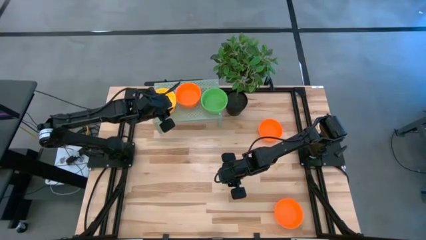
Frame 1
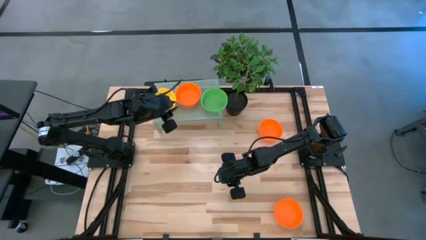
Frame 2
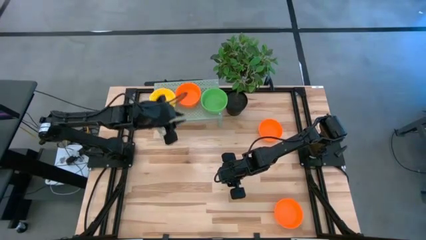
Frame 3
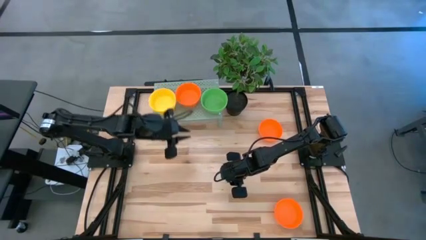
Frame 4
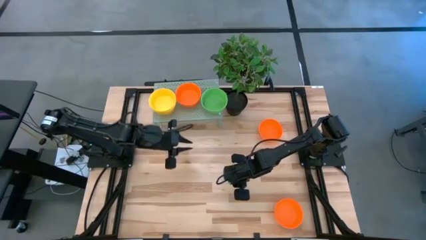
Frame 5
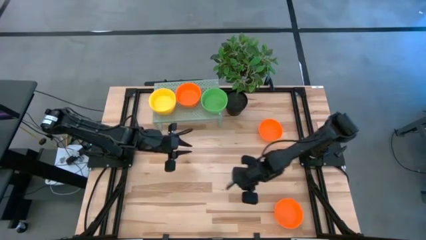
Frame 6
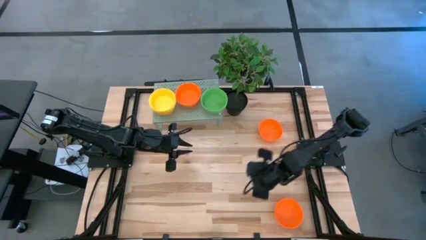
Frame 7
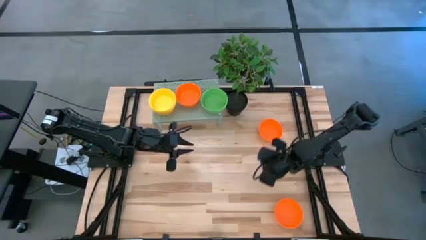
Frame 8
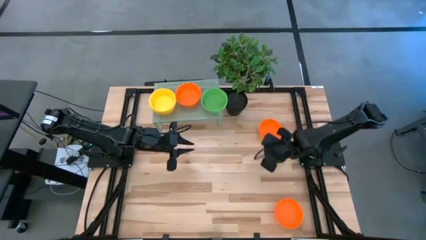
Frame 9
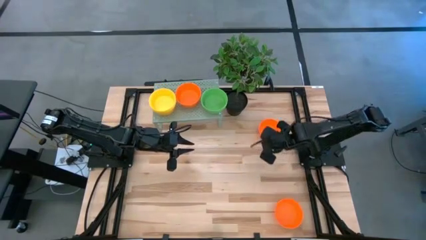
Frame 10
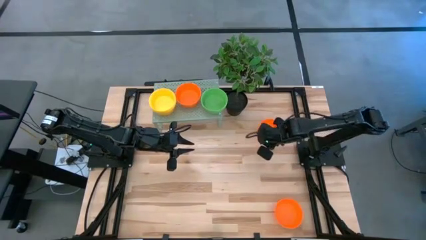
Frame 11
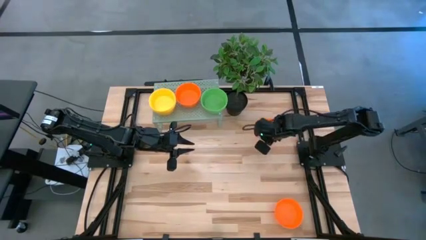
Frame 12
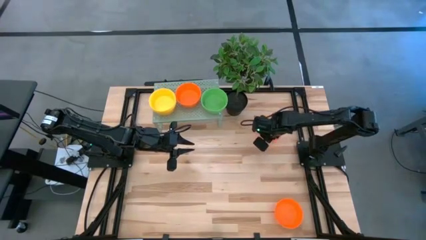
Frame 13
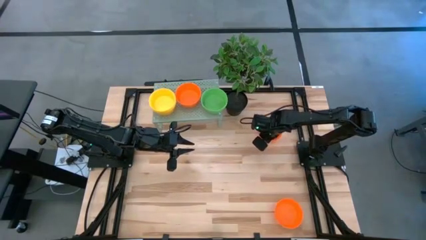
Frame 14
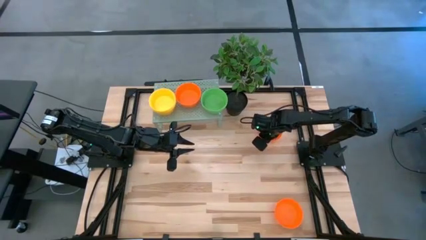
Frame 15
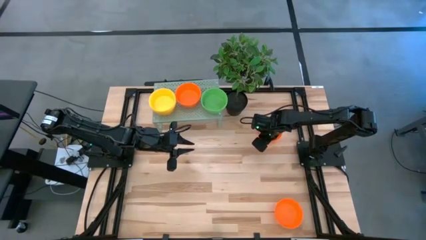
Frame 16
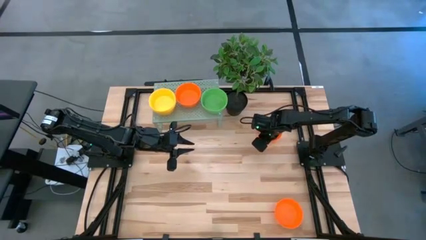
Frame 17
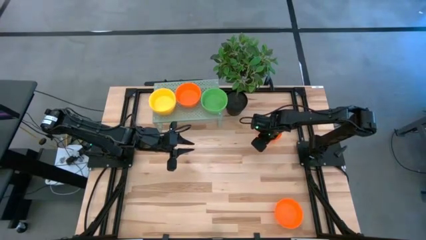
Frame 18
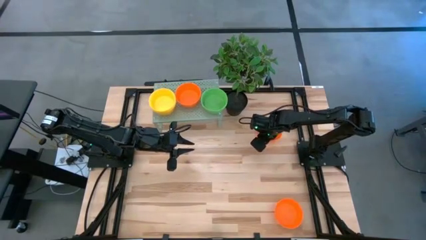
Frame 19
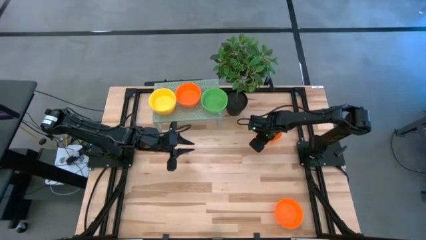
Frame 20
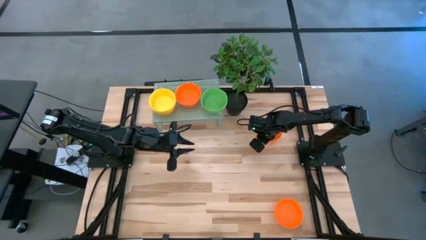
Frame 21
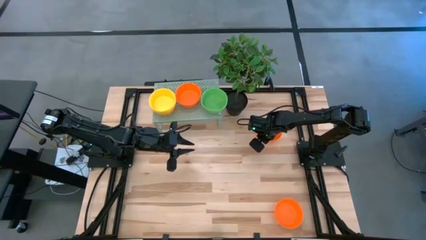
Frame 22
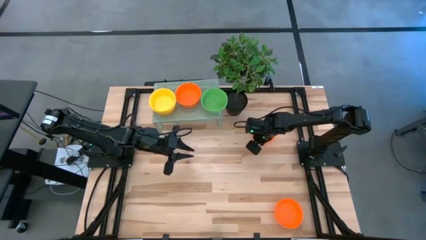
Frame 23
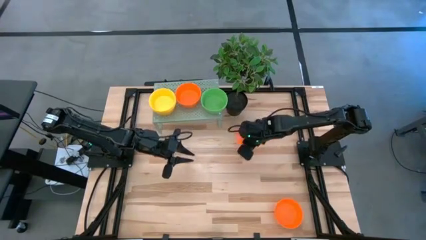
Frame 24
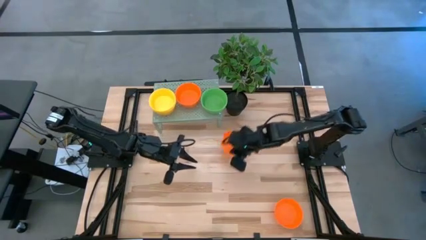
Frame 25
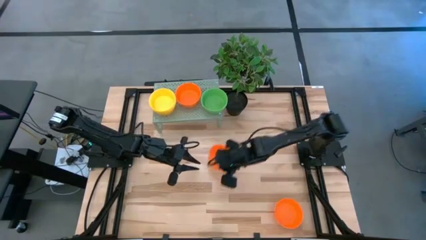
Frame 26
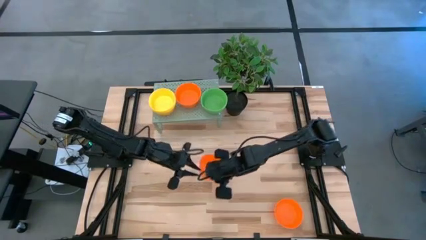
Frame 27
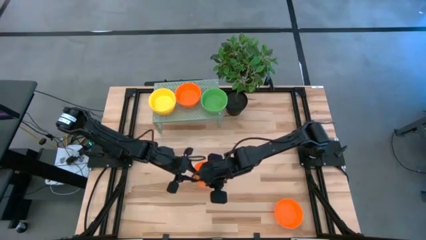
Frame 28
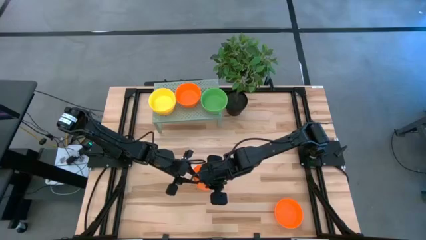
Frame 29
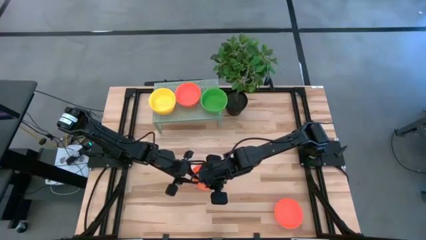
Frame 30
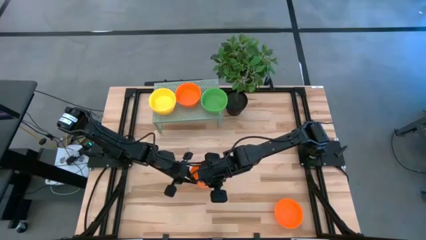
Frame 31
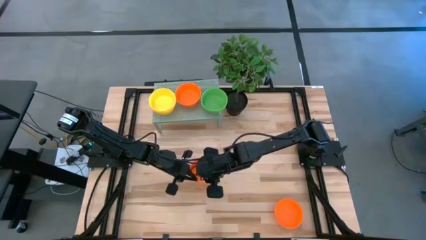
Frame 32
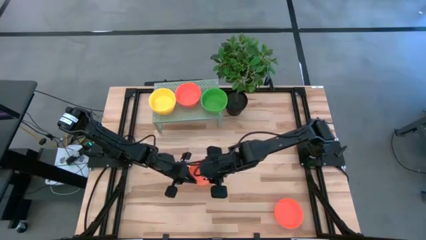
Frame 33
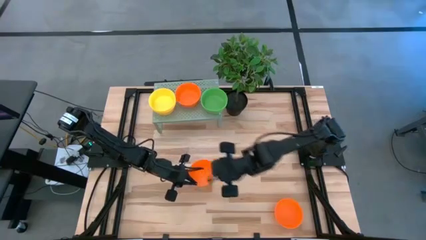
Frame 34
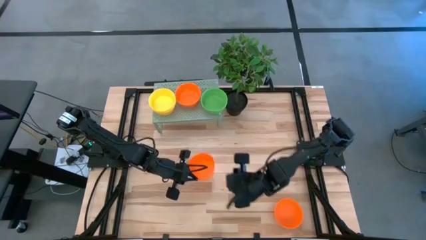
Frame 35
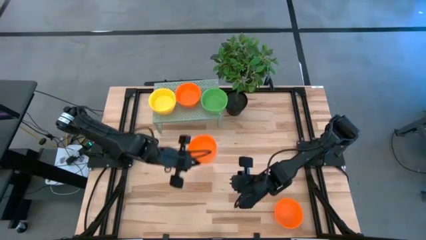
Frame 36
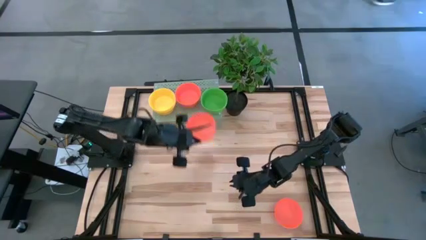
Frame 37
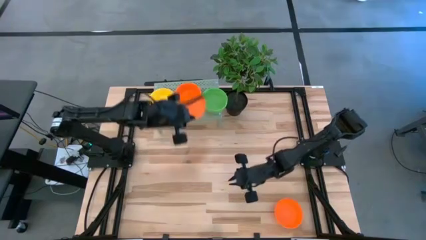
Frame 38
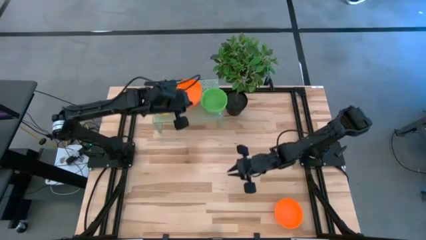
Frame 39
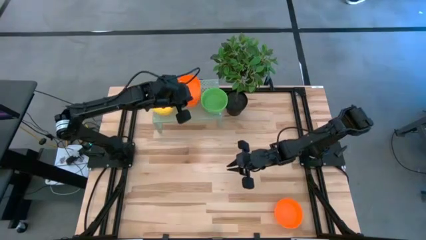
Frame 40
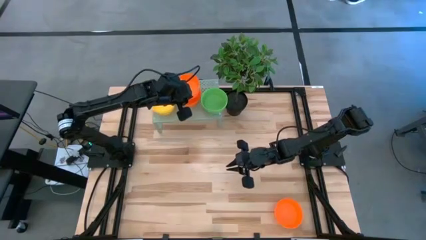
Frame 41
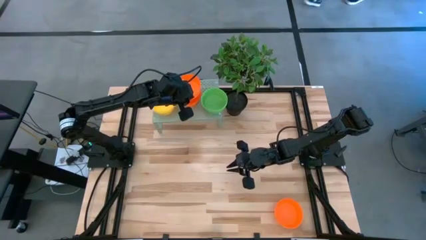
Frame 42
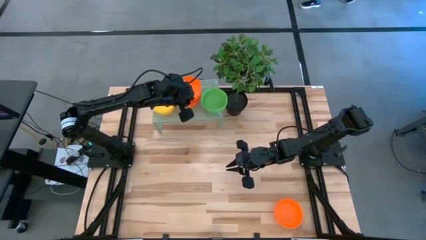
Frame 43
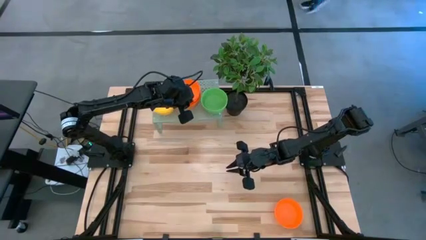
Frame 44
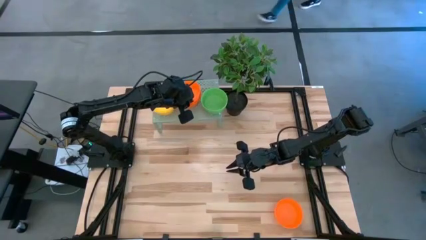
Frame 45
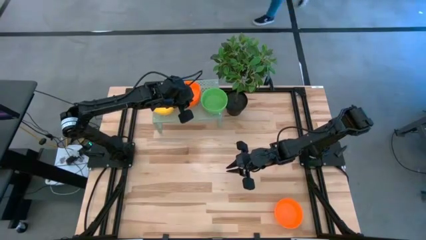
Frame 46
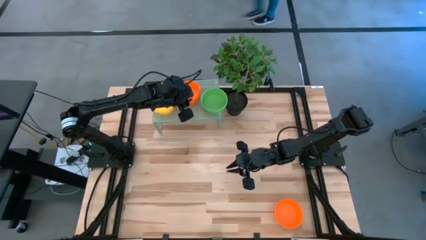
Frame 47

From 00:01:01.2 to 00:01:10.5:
Task: Pick & Place Mini bowls
Stack the orange bowl on top of the other orange bowls on the shelf

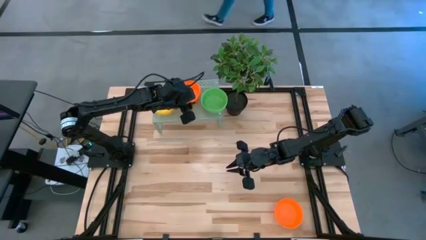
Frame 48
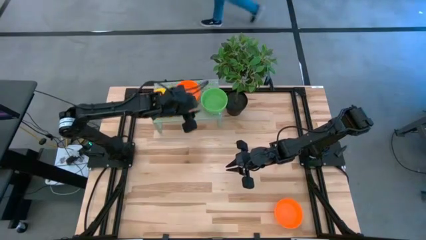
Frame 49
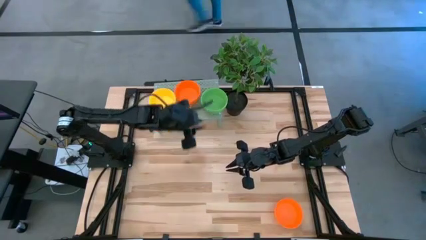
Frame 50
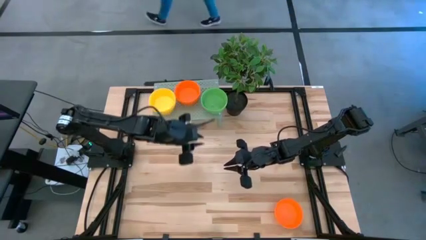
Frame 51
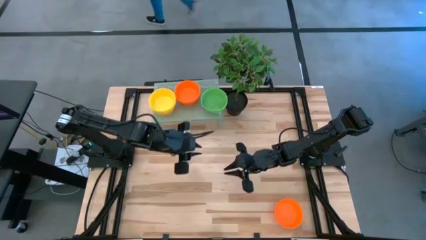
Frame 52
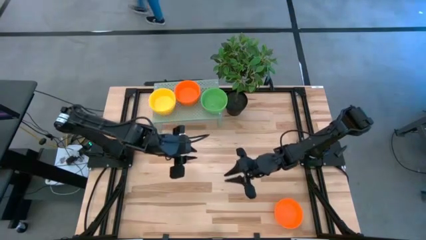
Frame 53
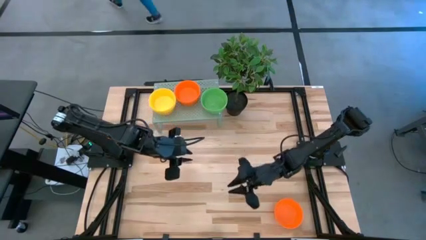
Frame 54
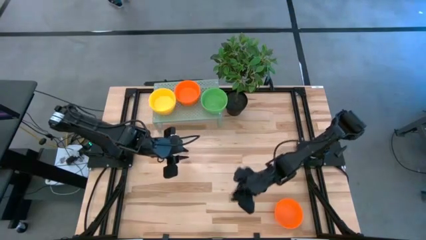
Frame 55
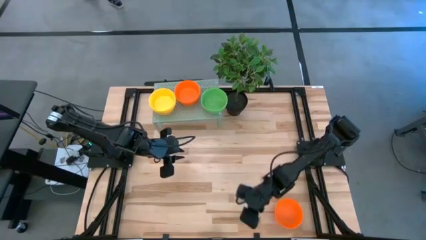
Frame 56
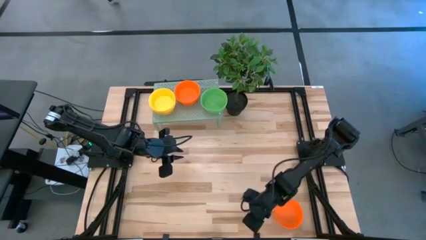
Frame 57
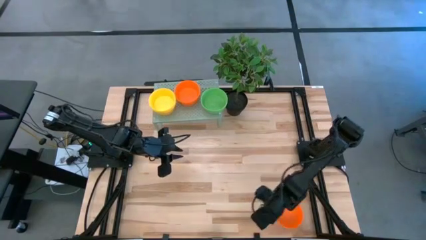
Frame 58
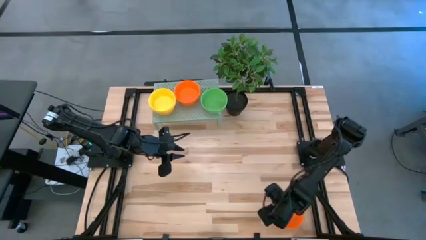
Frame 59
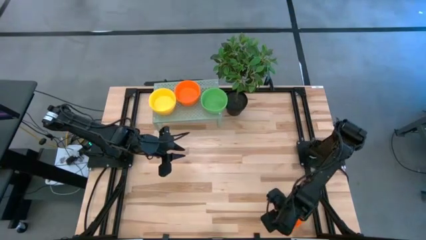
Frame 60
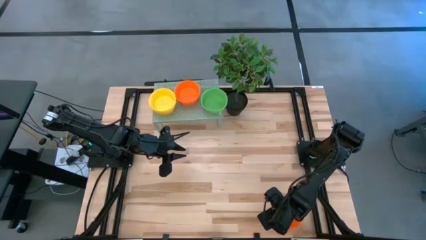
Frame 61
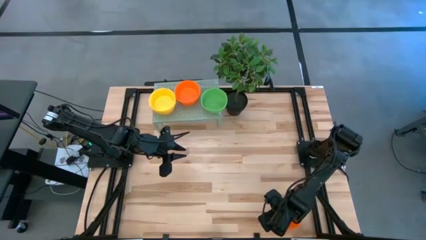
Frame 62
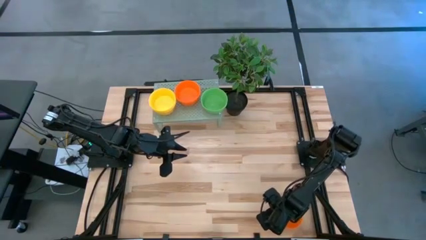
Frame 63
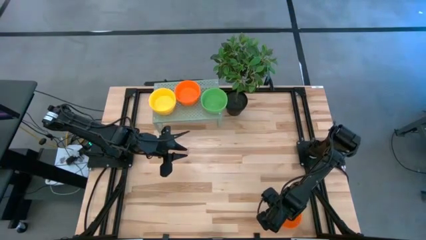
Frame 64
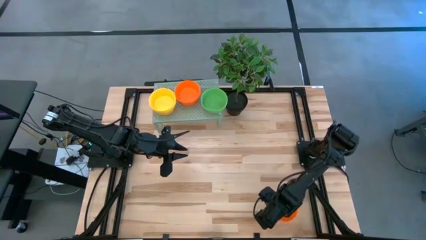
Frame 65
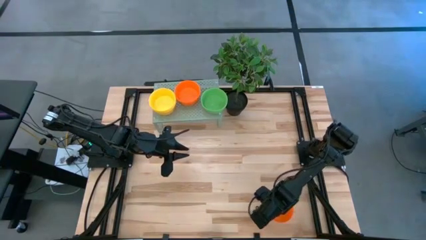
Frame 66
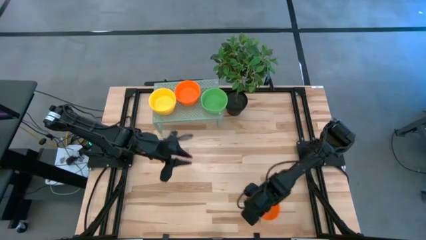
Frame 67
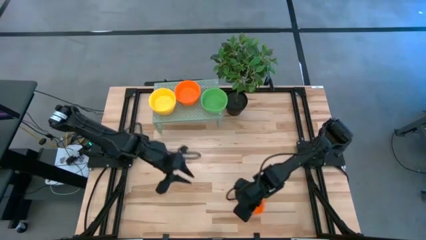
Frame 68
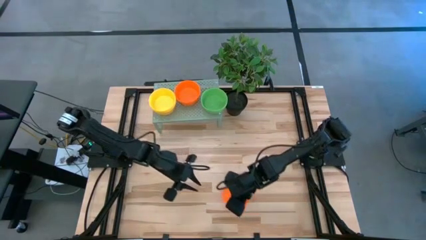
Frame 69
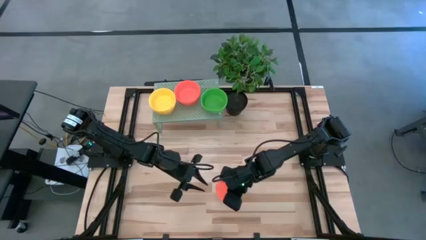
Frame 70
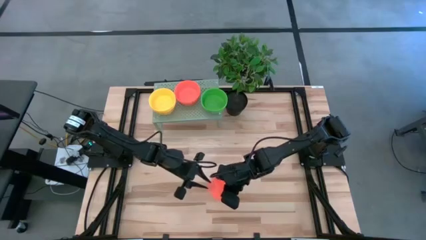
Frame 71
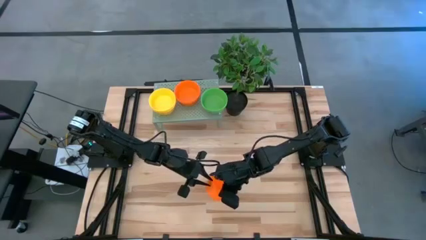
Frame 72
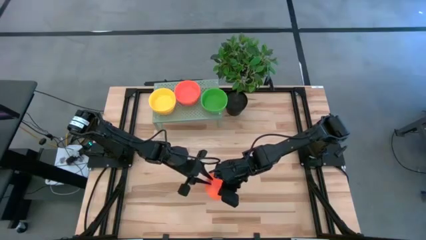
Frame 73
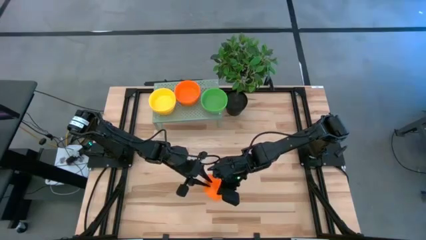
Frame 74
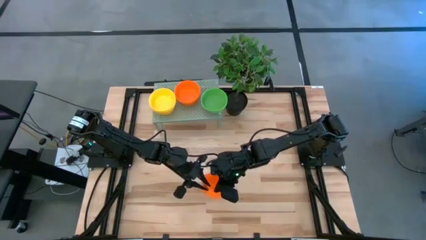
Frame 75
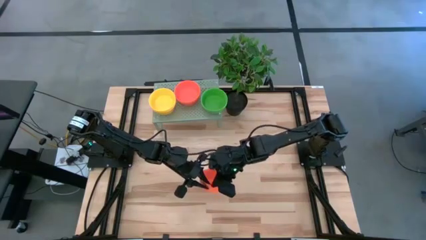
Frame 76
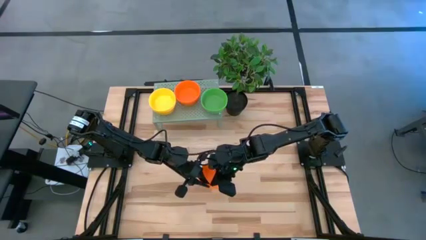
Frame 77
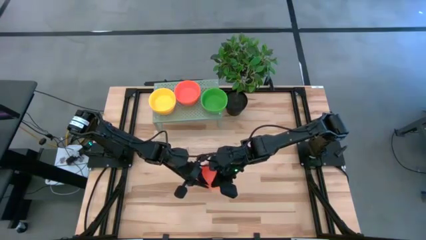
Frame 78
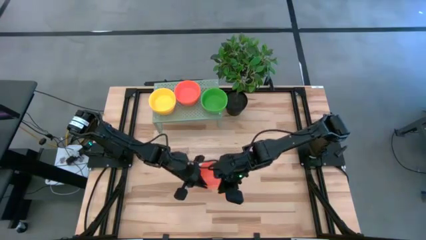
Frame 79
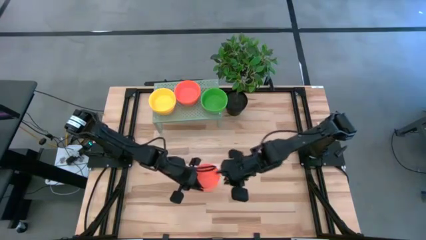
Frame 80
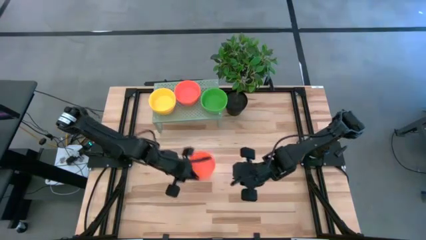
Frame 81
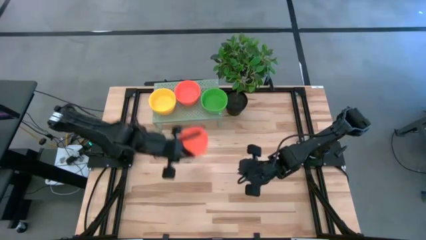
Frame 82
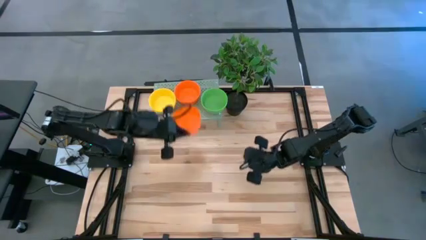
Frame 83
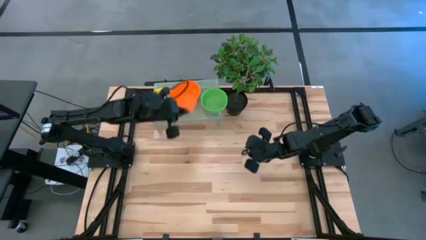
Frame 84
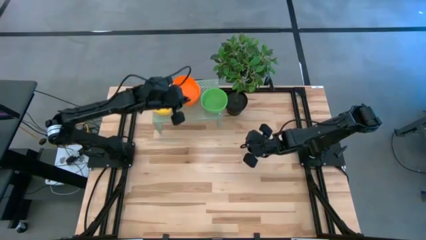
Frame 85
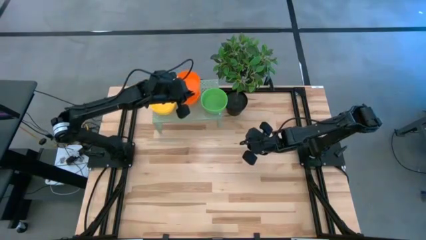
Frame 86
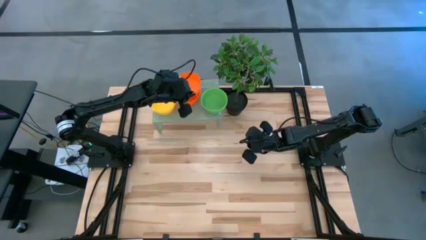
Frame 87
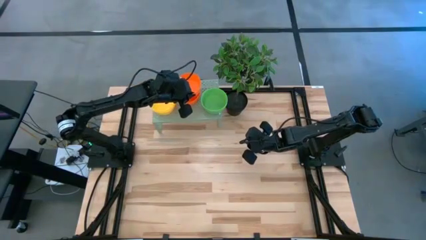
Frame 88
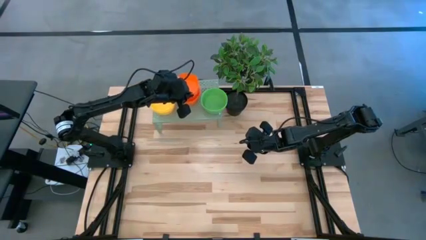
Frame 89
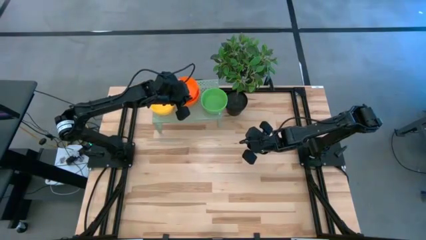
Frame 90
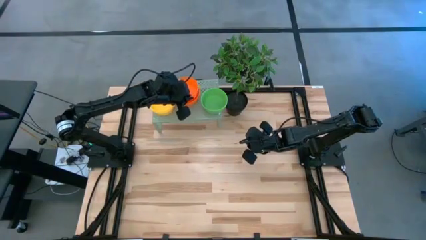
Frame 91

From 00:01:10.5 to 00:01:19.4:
Stack the orange bowl on top of the other orange bowls on the shelf
